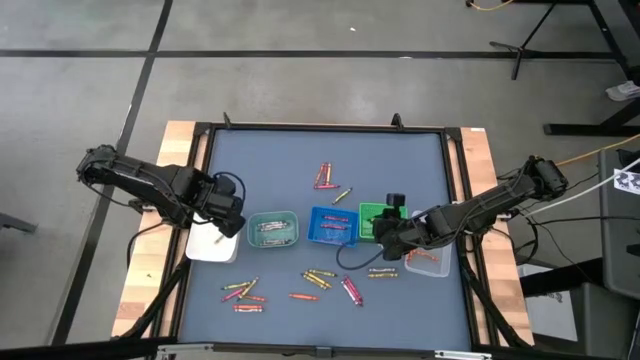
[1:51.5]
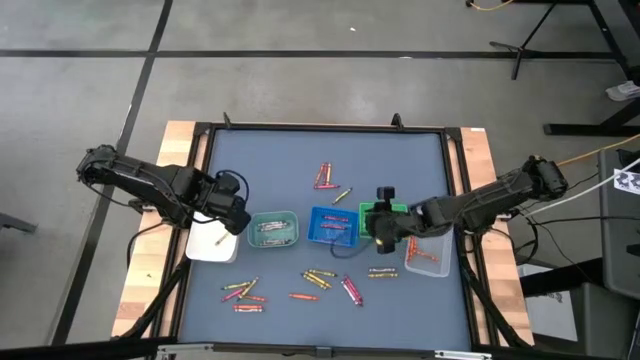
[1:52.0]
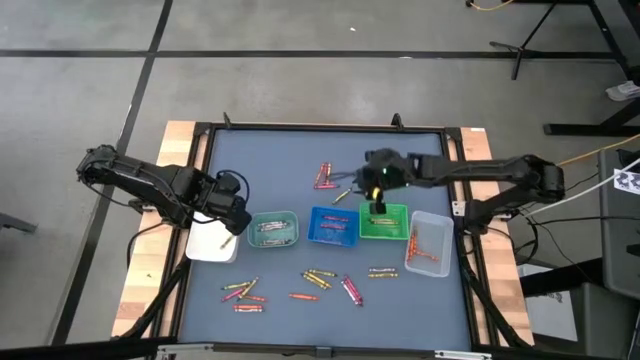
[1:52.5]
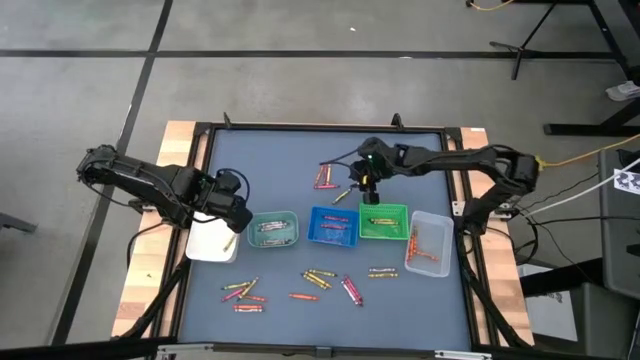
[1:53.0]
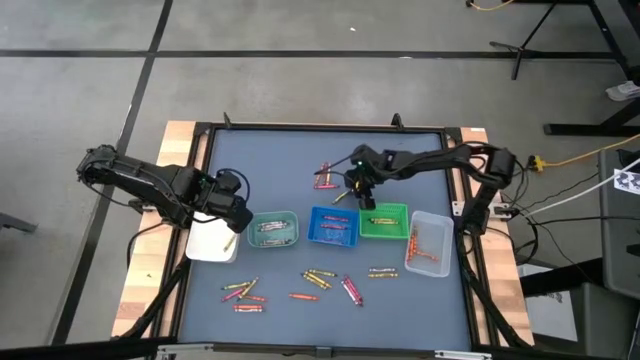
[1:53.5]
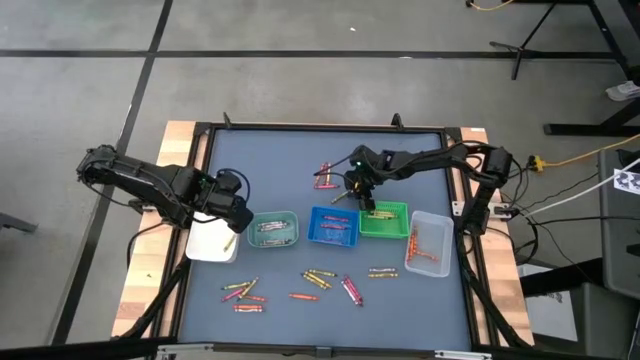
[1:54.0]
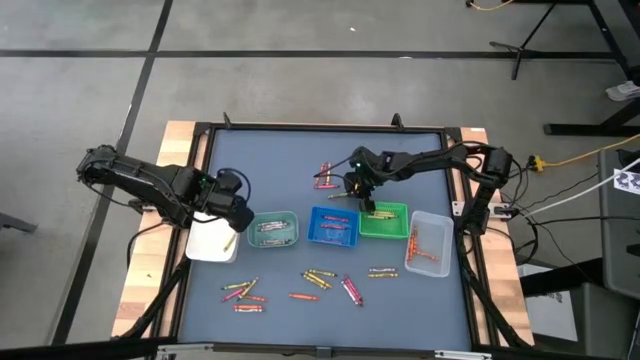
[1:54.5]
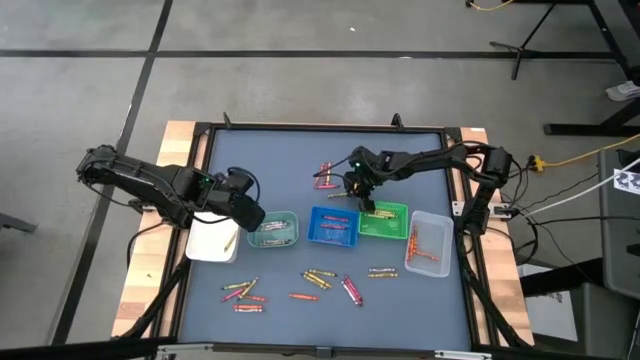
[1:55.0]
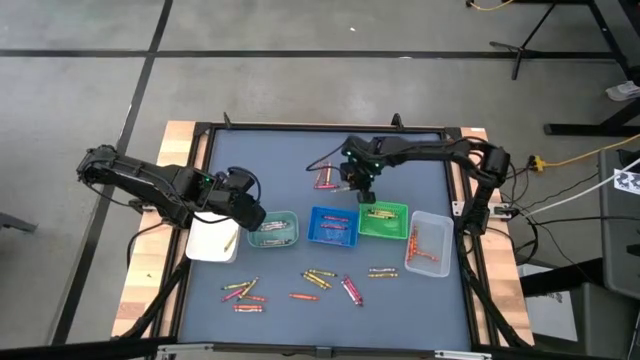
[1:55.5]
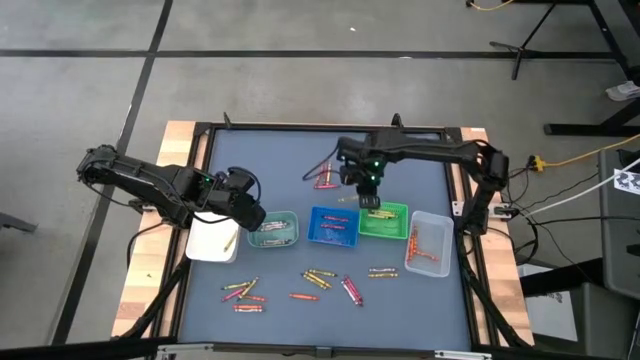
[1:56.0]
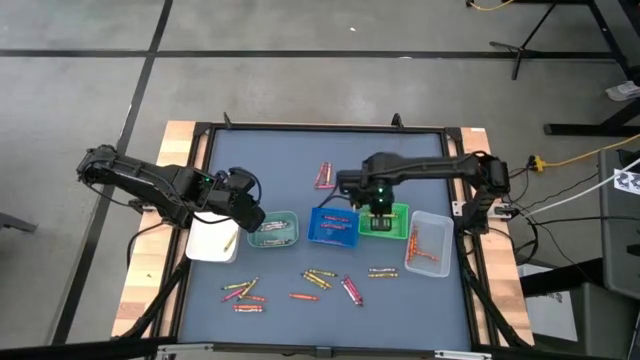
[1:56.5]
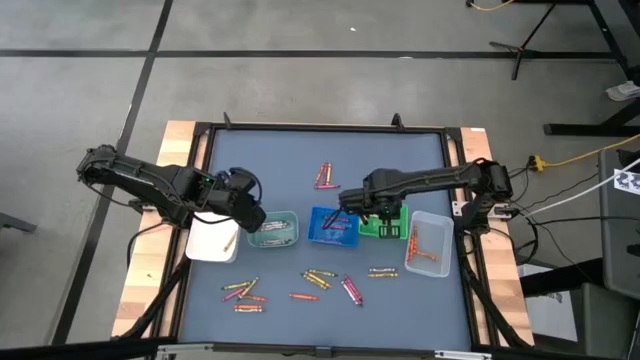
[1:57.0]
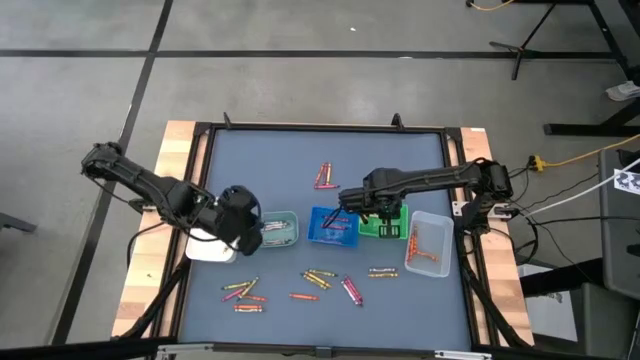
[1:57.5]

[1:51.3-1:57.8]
Task: Sort crayons
Put the green crayon into the green bin

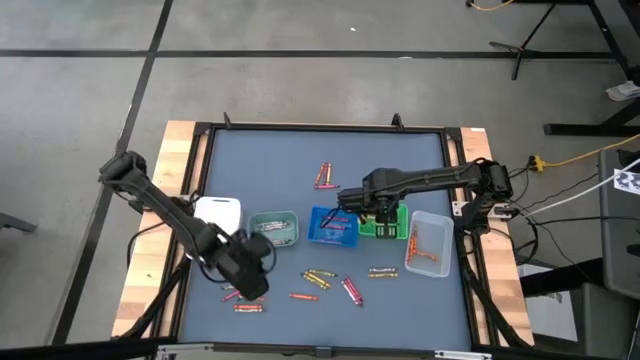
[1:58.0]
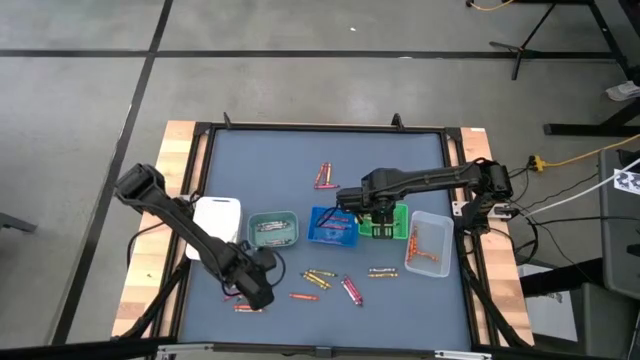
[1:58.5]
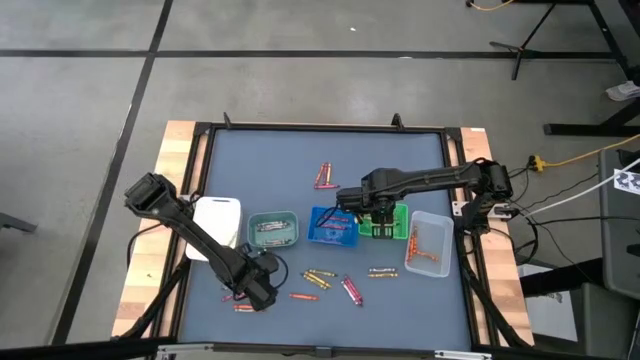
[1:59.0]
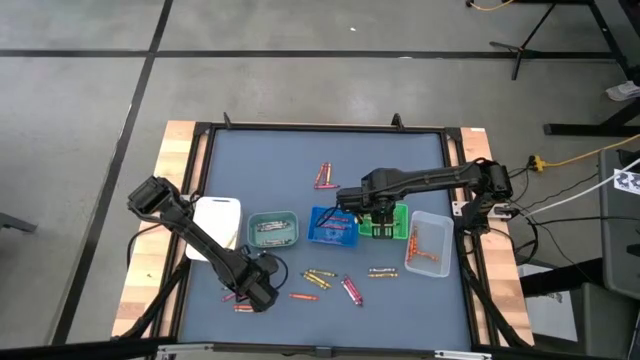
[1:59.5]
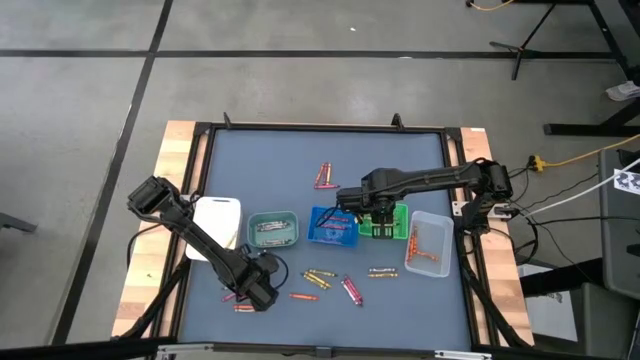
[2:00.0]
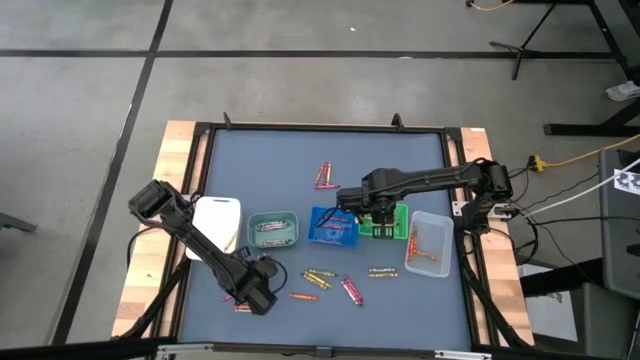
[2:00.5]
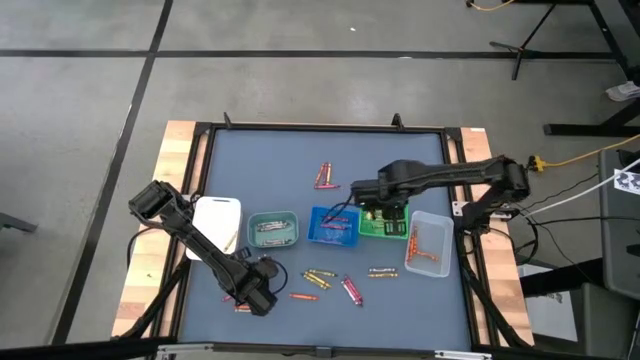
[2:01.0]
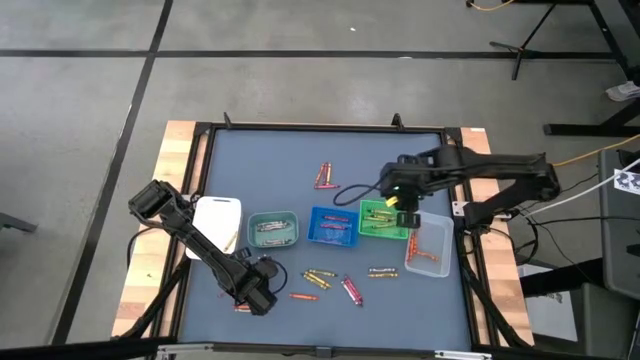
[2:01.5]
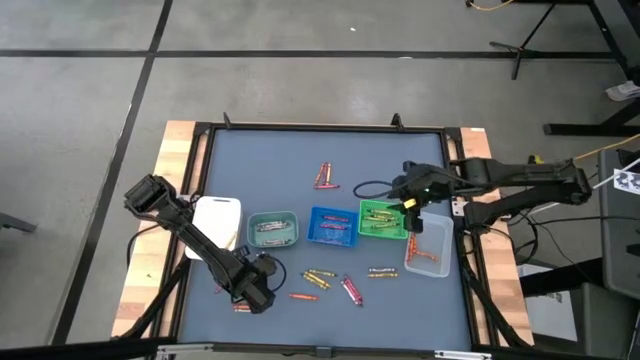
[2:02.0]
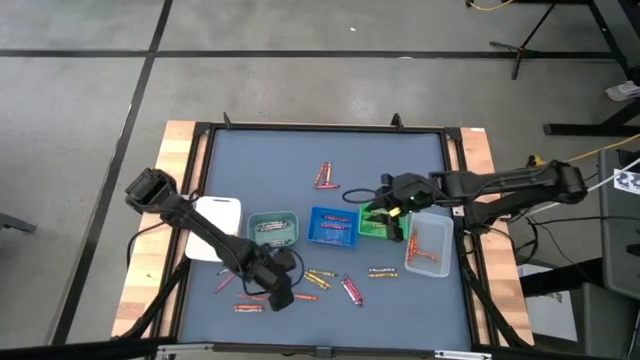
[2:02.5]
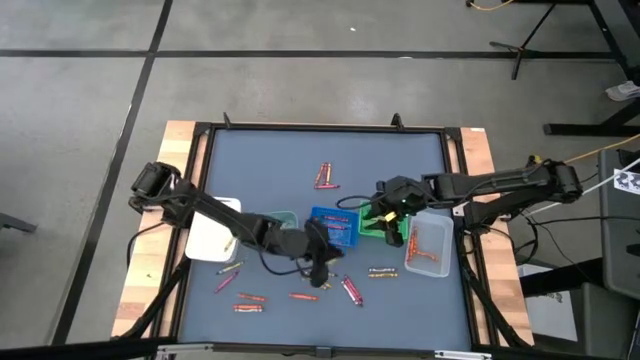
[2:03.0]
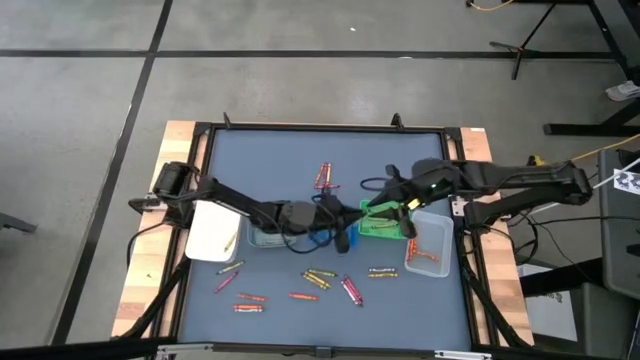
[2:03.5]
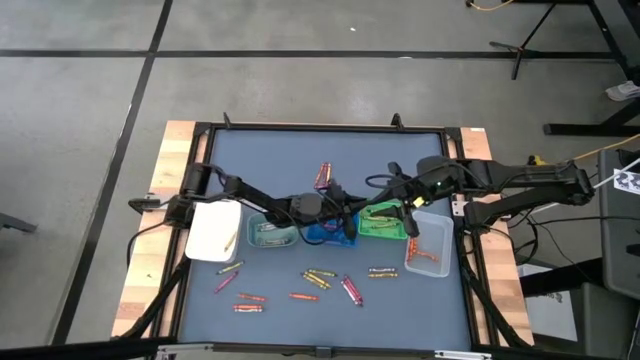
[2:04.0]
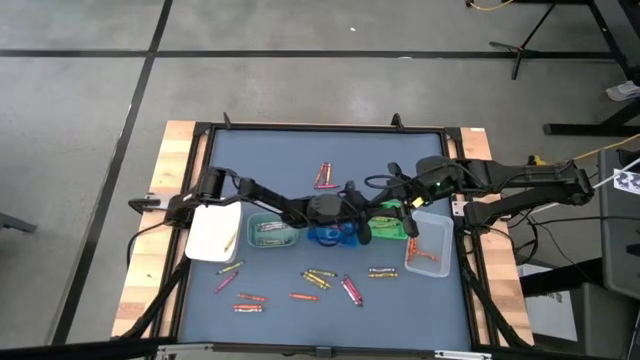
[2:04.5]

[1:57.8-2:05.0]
Put the green crayon into the green bin

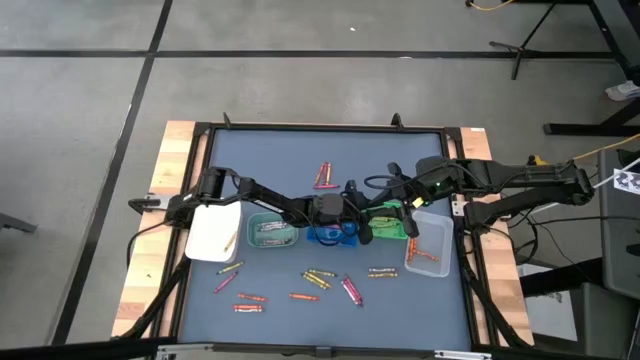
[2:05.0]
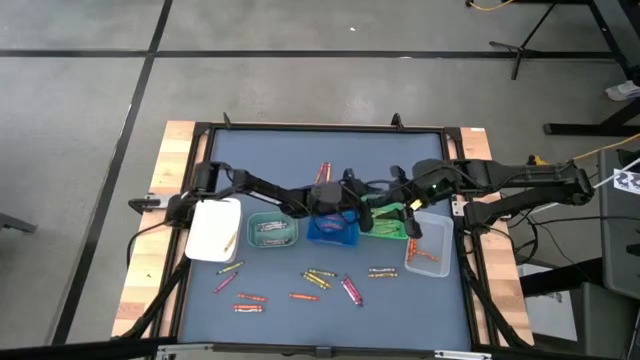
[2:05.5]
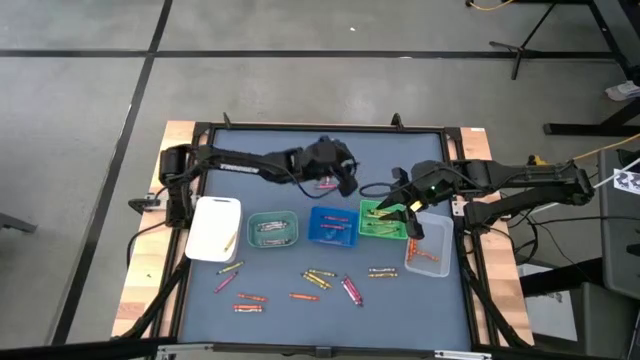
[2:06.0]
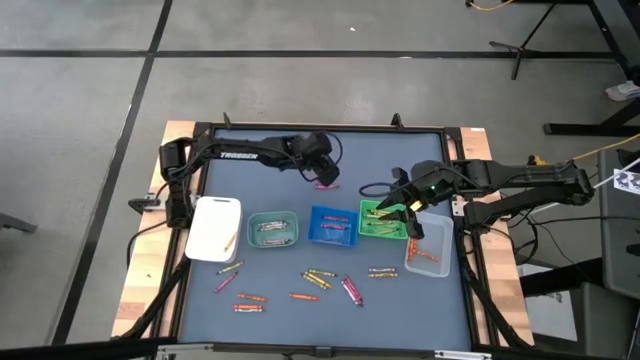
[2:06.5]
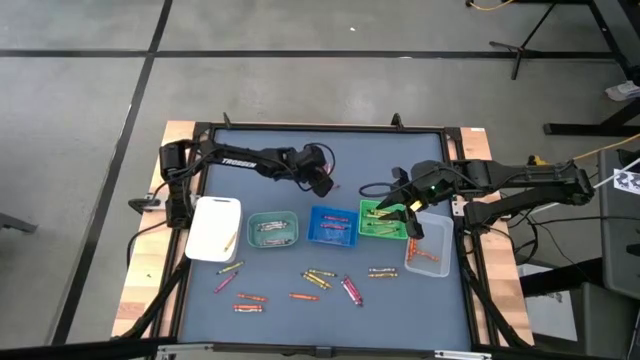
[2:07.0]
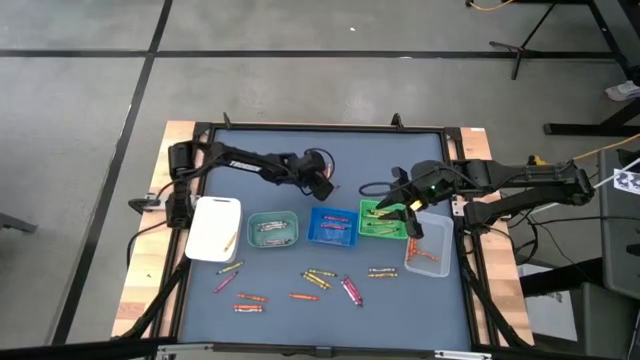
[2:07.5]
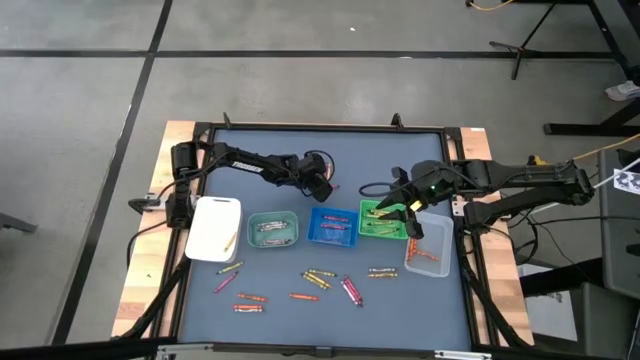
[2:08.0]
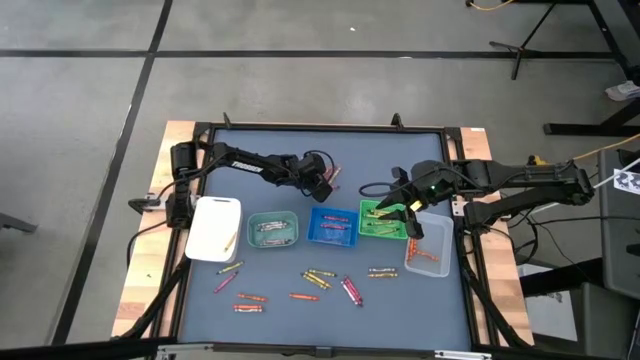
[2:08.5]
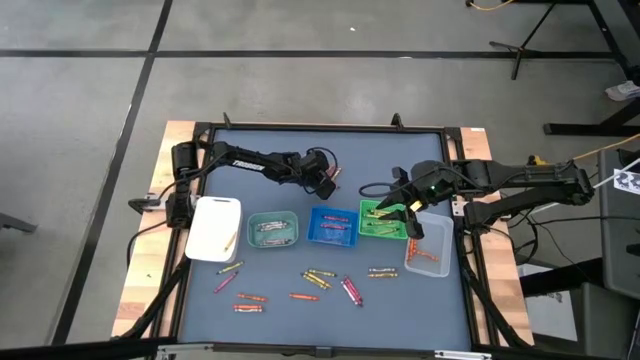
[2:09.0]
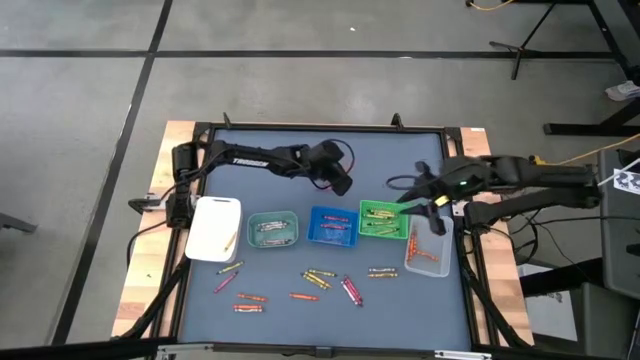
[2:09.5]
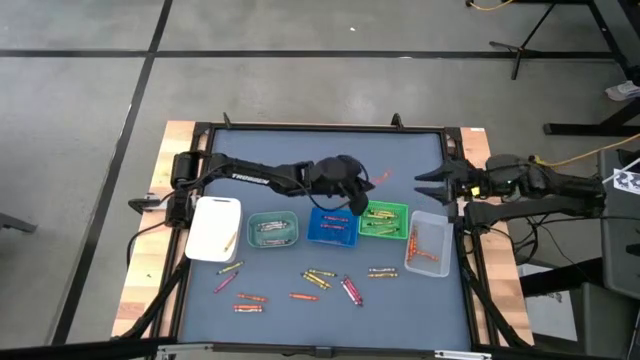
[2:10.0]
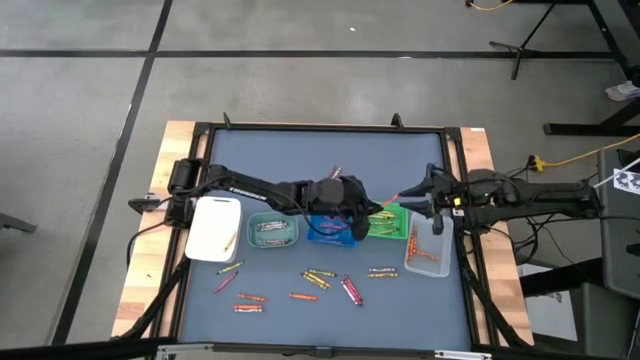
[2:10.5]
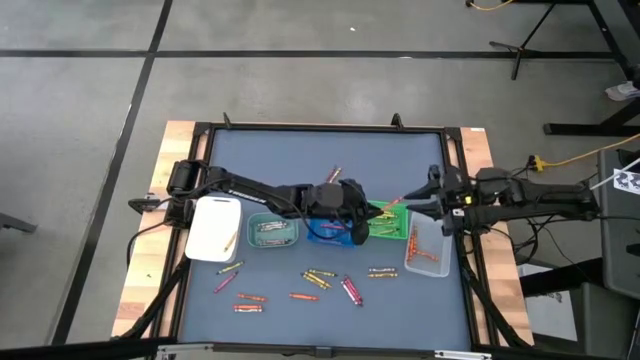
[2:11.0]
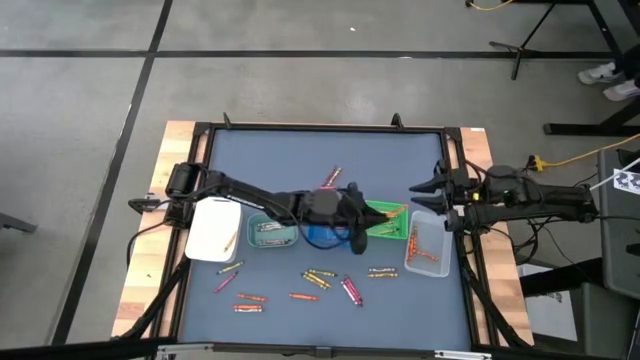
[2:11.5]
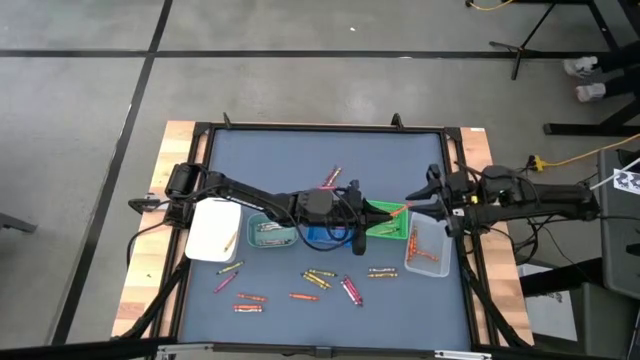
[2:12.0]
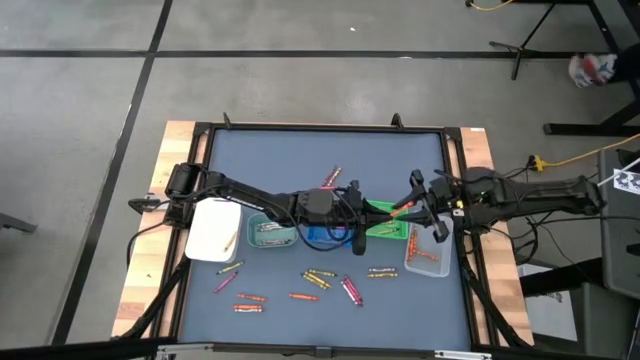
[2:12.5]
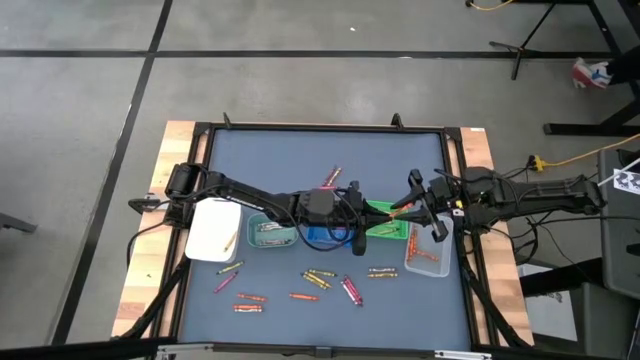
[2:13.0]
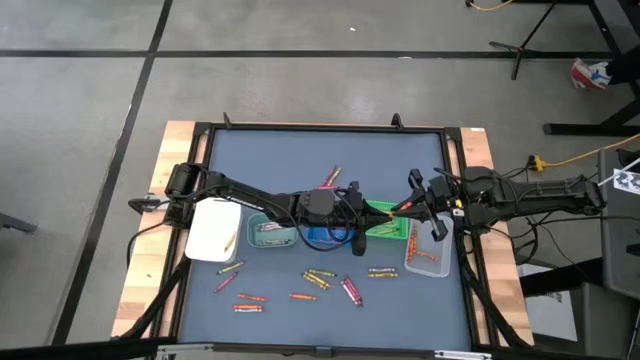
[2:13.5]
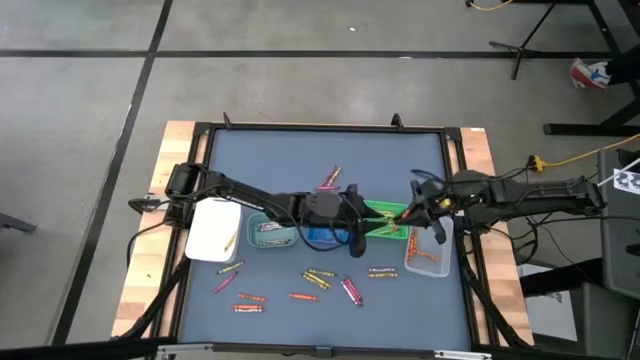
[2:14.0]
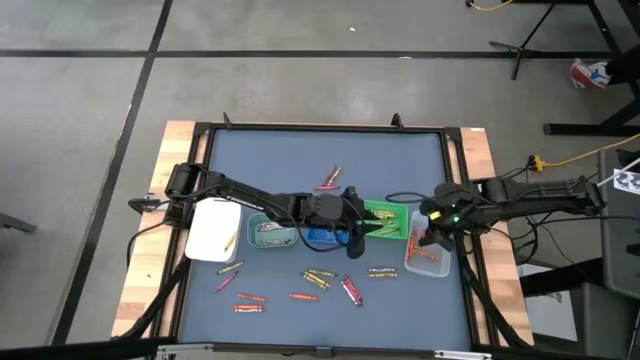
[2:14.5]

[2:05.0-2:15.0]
Put the orange crayon into the transparent bin
